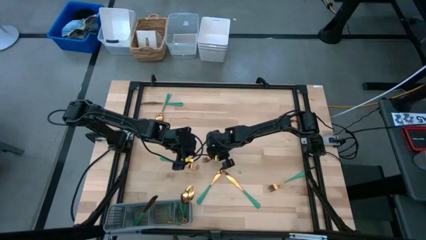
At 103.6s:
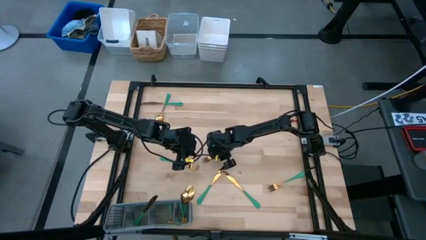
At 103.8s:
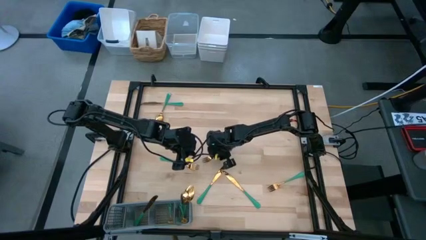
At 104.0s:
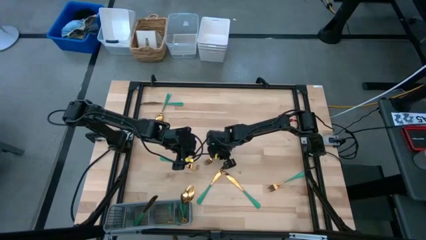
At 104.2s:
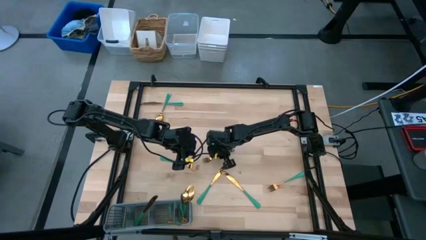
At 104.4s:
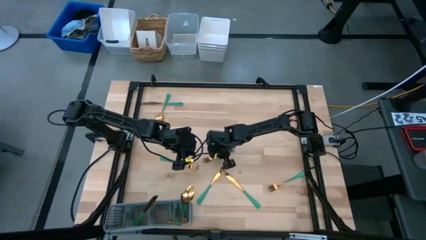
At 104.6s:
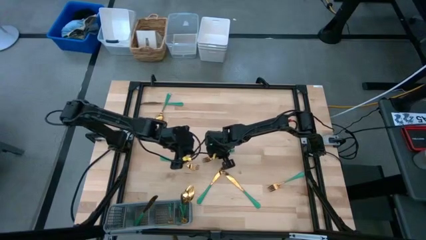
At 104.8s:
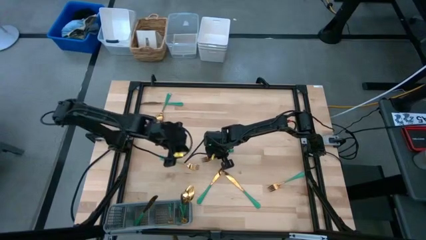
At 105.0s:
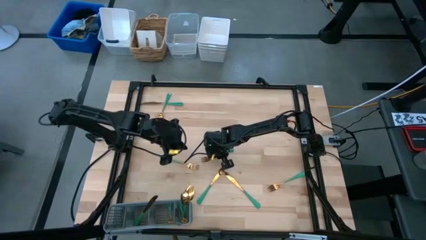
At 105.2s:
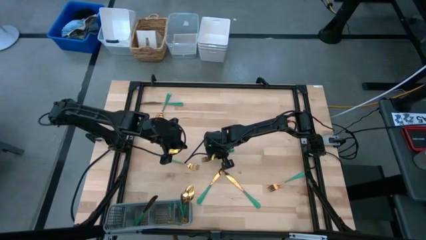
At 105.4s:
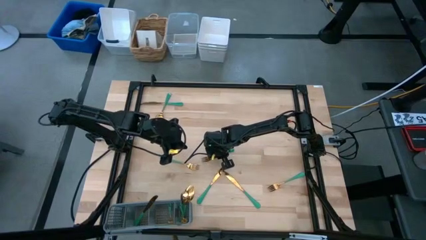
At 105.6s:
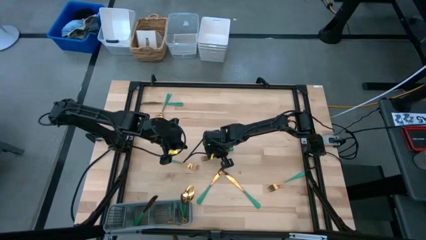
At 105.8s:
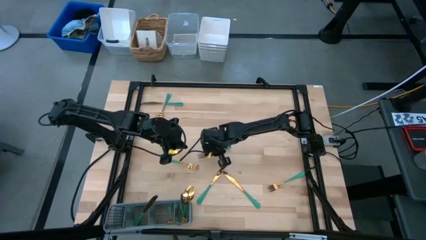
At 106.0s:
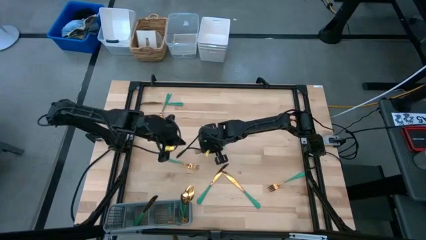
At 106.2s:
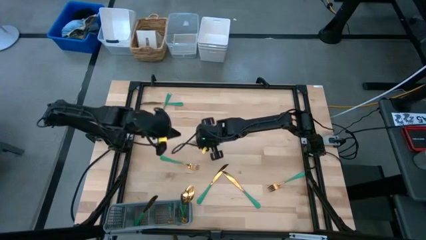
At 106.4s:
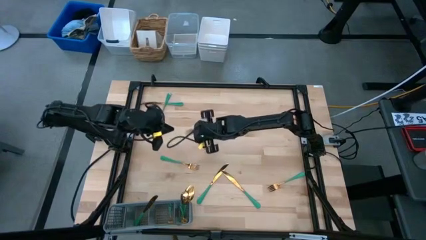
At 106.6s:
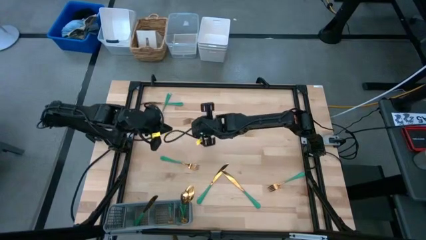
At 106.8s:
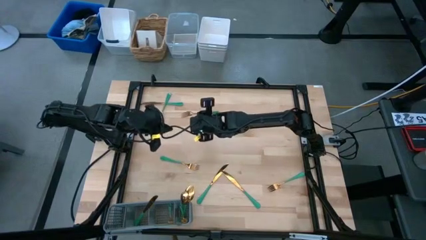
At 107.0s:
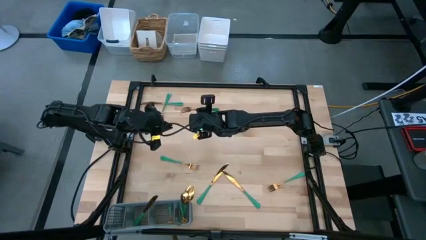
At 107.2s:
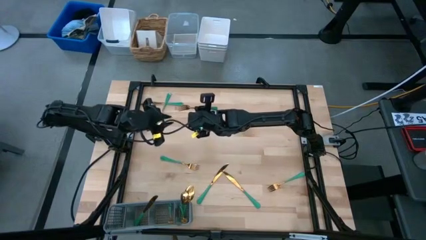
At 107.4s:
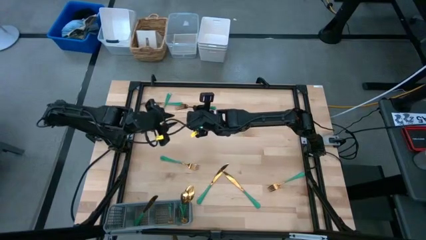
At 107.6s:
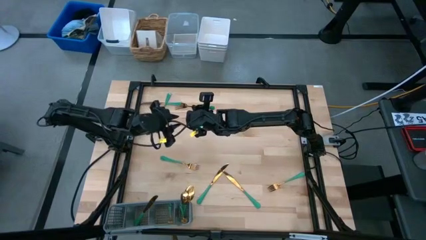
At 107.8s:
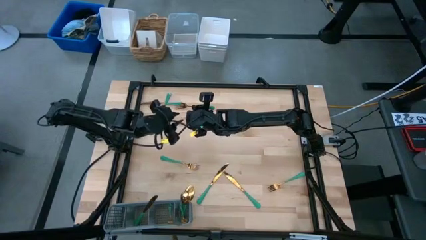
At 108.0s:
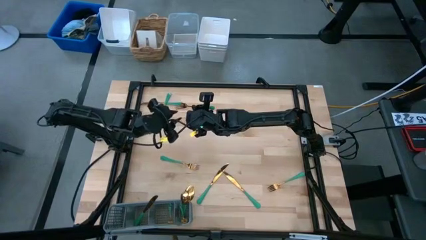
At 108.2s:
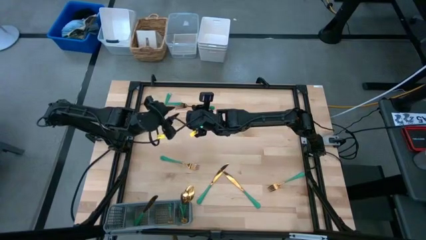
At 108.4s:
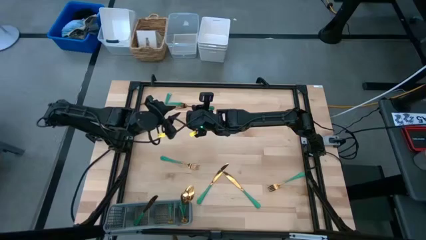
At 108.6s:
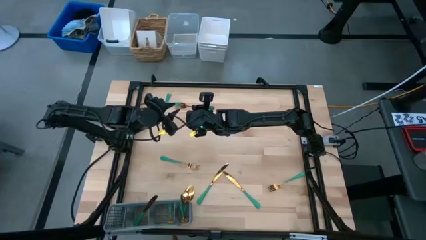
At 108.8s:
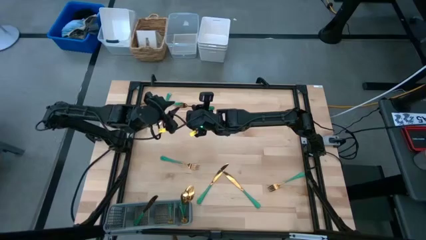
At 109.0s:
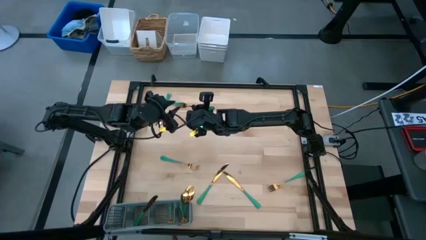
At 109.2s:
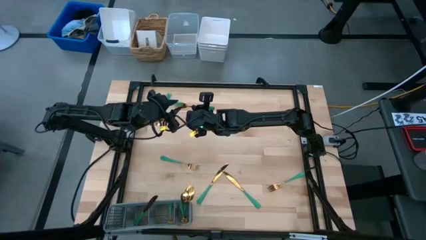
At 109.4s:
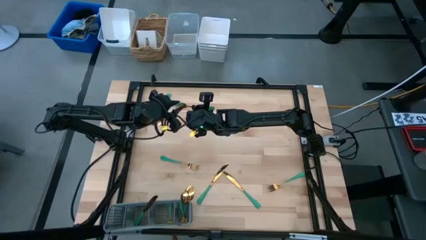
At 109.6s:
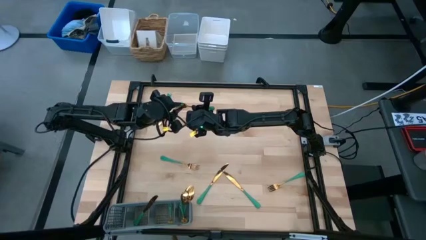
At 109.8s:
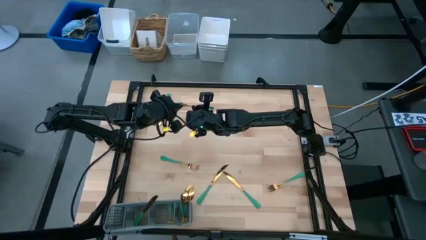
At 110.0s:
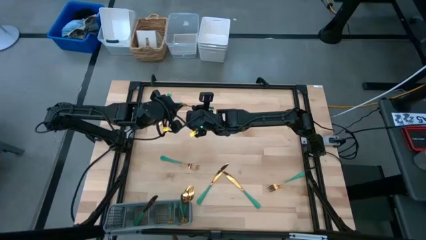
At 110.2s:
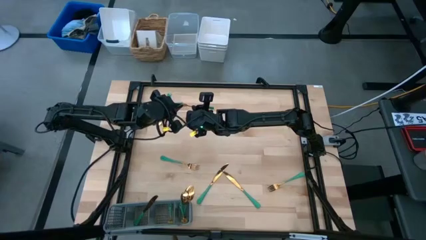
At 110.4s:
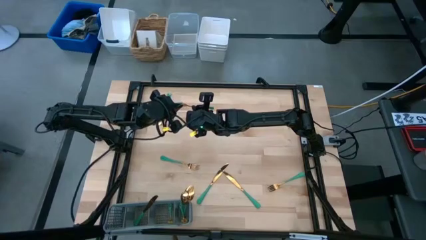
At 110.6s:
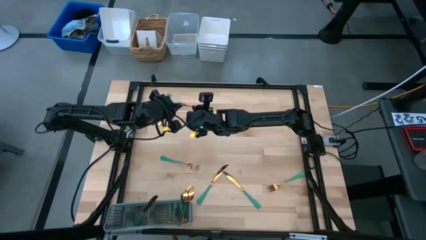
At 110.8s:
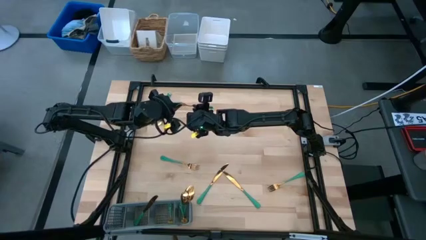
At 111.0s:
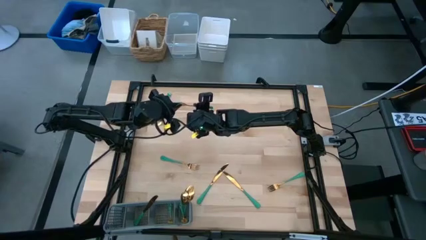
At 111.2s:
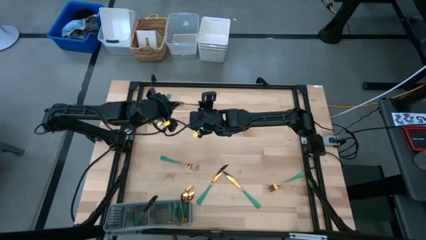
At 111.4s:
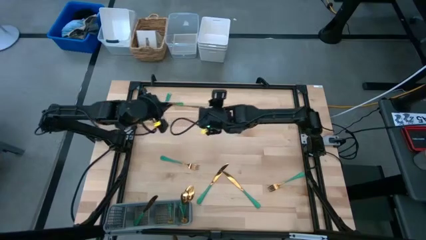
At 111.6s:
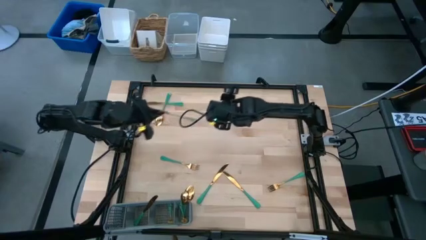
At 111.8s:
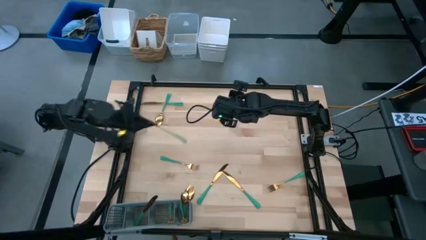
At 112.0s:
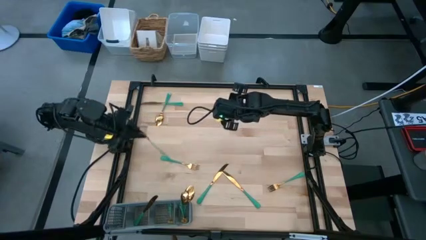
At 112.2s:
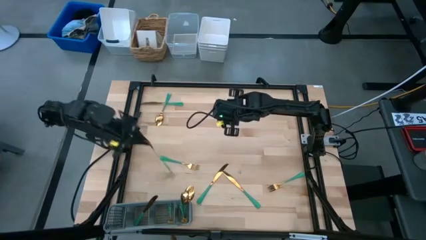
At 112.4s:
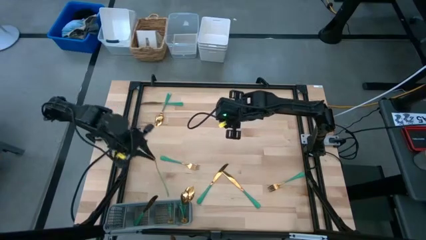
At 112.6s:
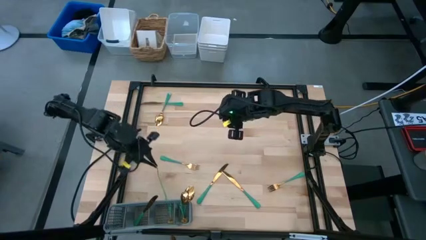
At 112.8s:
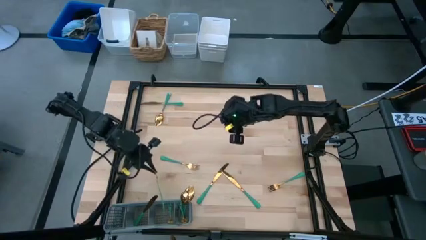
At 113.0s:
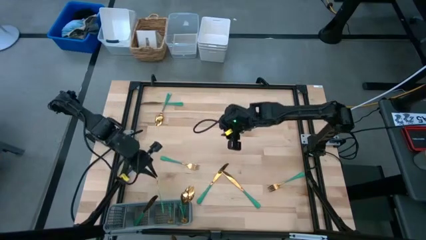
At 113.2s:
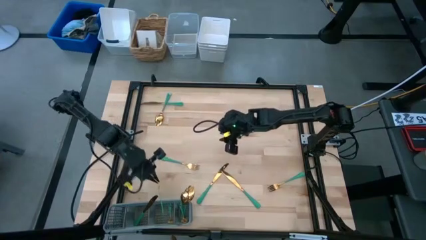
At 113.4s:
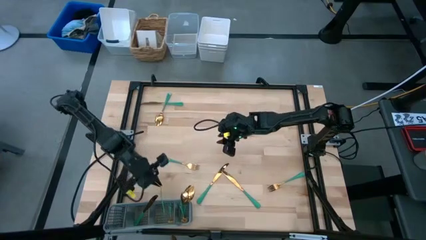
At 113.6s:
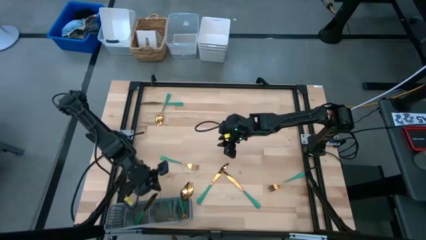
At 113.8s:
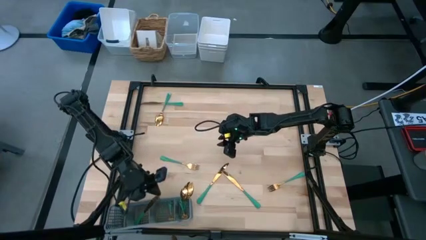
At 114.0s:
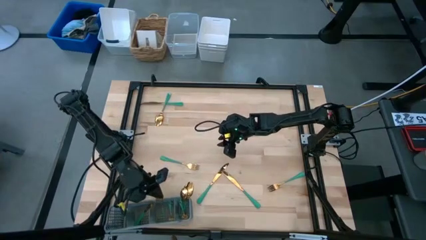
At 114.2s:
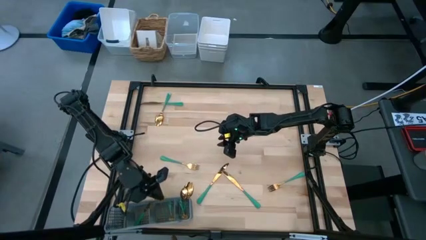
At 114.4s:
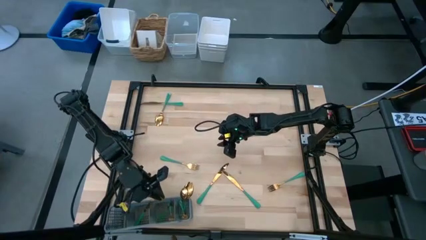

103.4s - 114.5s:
Task: Sort silverware
Put the middle fork into the cutlery rack

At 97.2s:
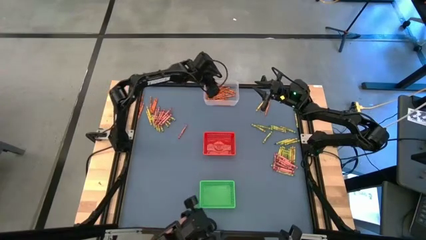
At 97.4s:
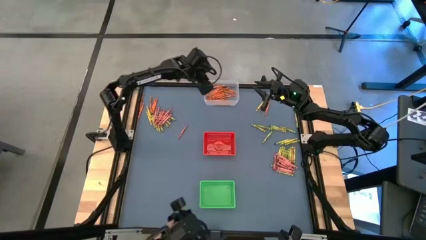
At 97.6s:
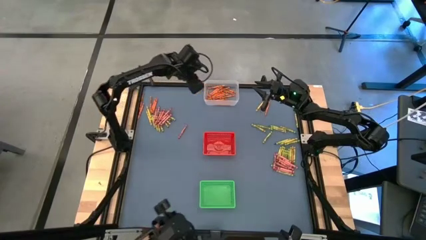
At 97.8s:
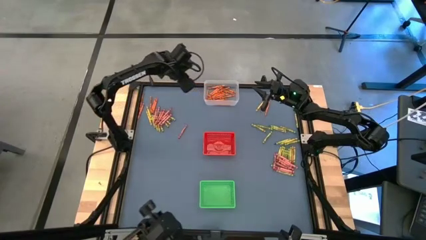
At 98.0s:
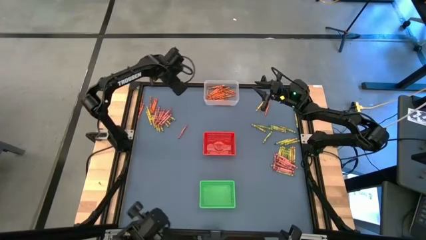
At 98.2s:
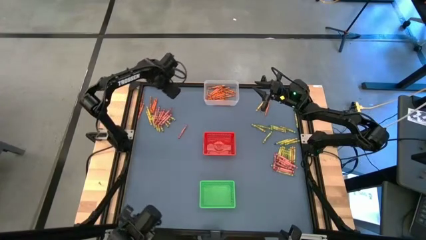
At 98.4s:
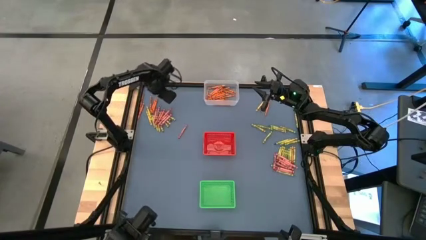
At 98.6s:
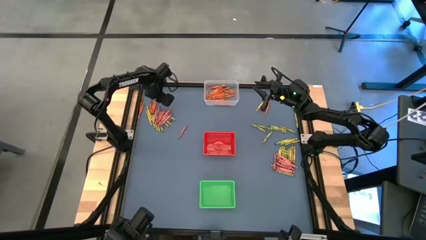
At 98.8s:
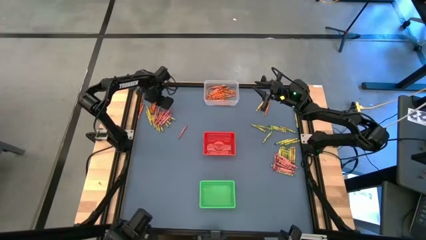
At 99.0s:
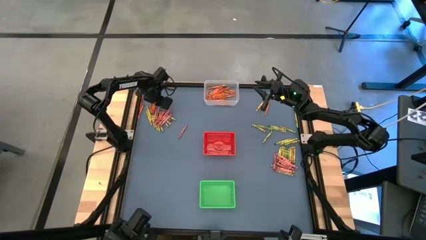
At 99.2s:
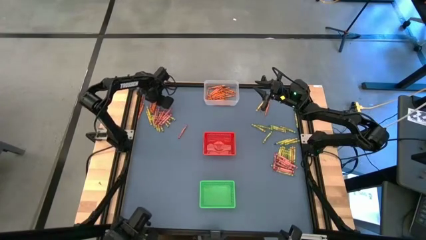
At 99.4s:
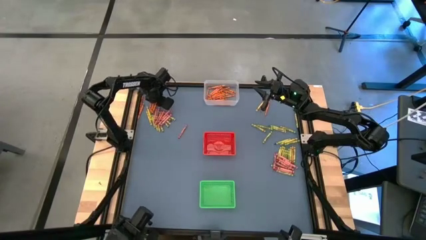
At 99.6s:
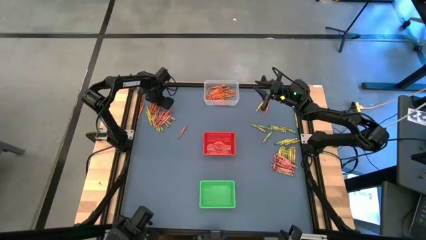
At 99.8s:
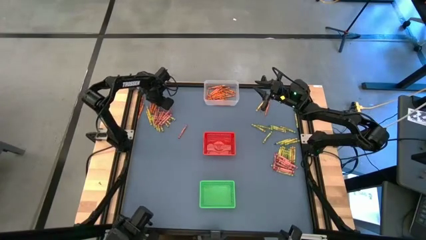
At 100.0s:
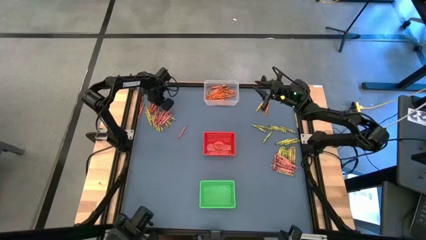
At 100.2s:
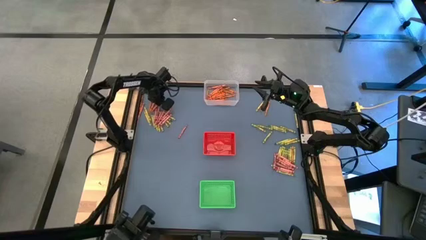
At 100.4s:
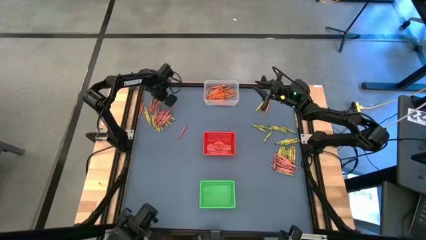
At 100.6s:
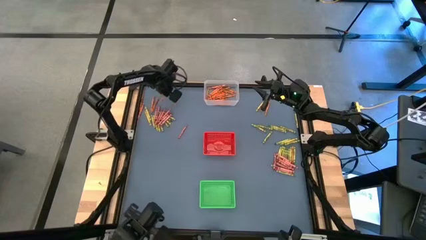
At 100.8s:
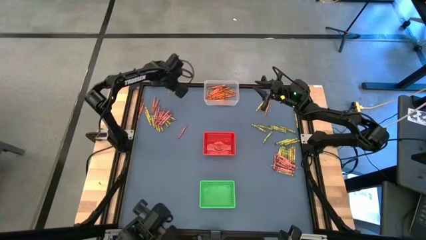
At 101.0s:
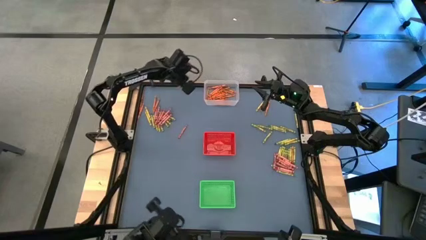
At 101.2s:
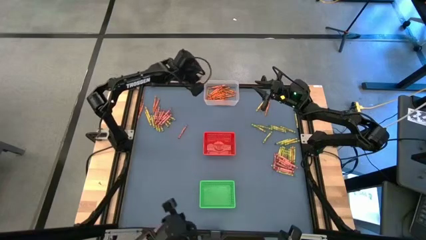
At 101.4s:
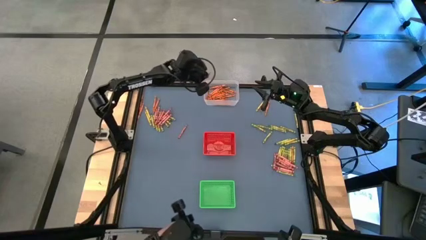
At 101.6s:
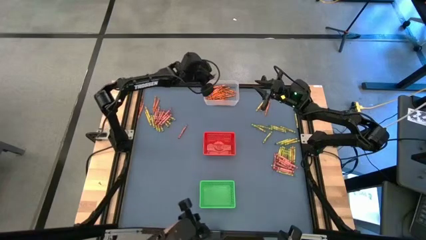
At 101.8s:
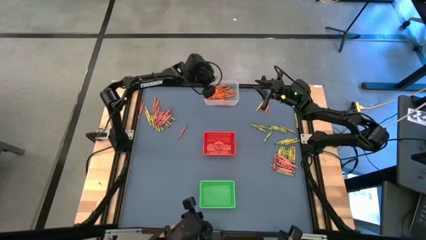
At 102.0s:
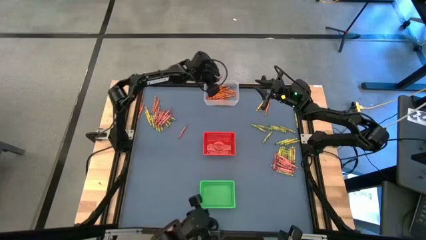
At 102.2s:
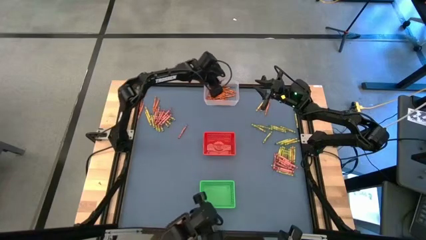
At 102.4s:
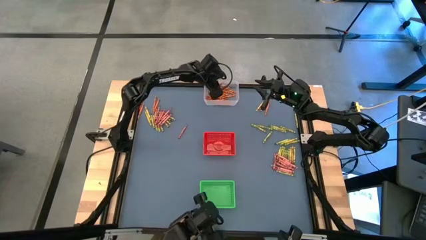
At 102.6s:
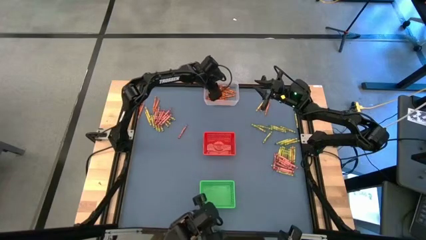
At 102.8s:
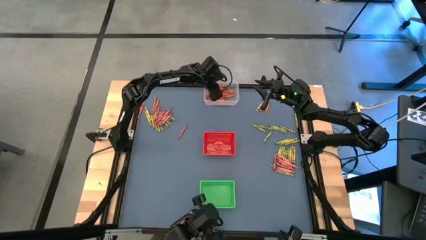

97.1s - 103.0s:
Task: Sort crayons
Put the orange crayon into the transparent bin
